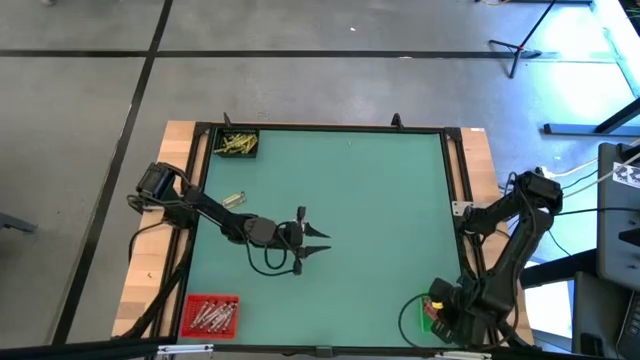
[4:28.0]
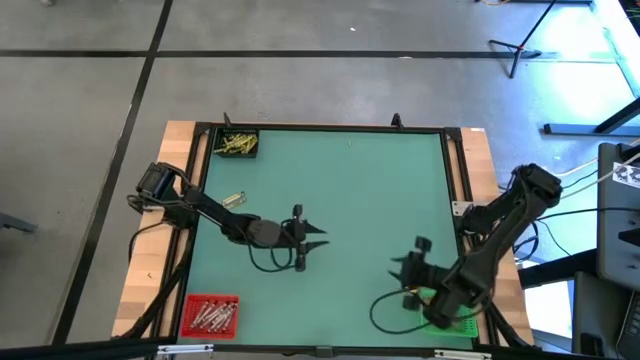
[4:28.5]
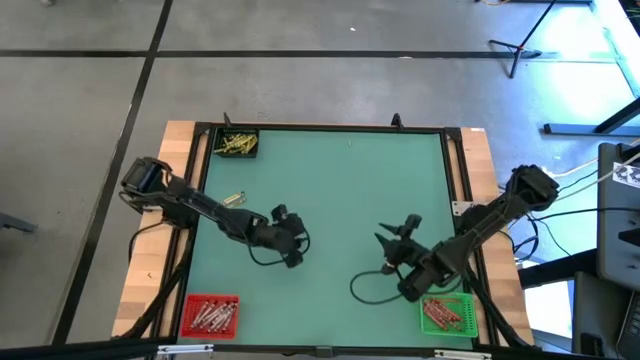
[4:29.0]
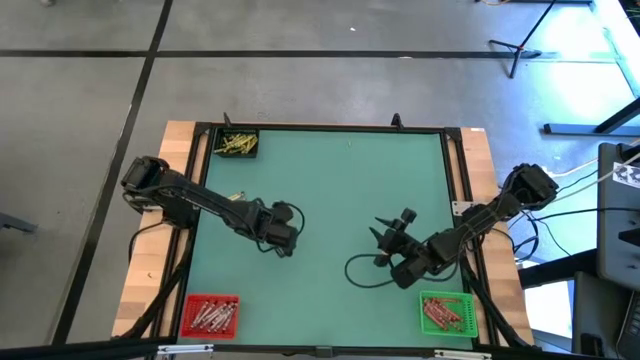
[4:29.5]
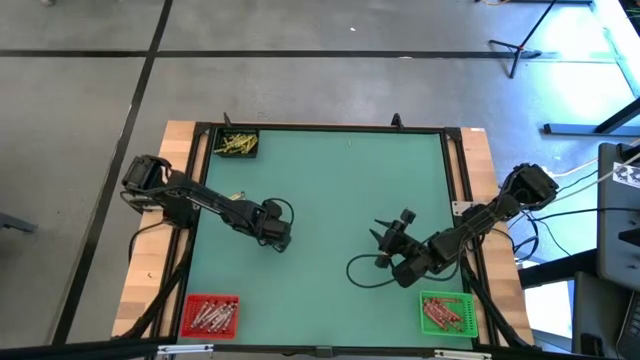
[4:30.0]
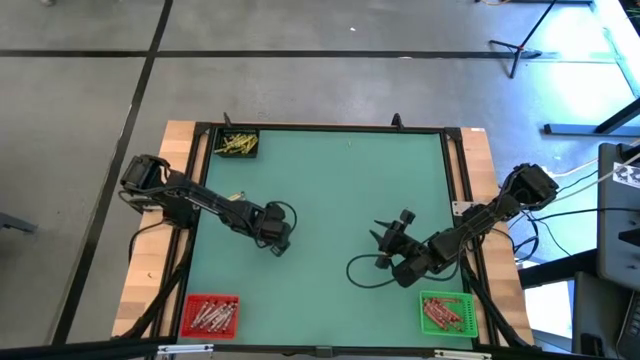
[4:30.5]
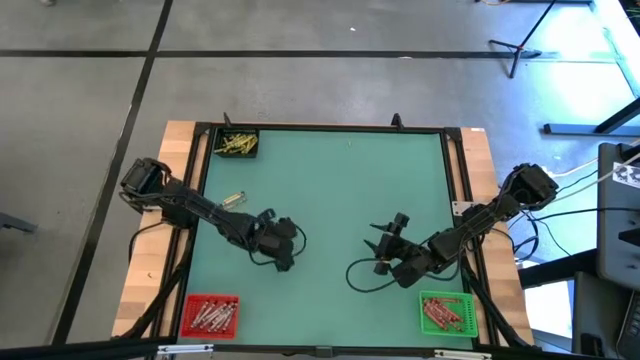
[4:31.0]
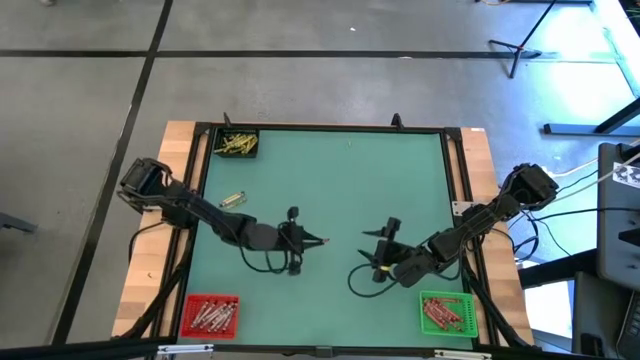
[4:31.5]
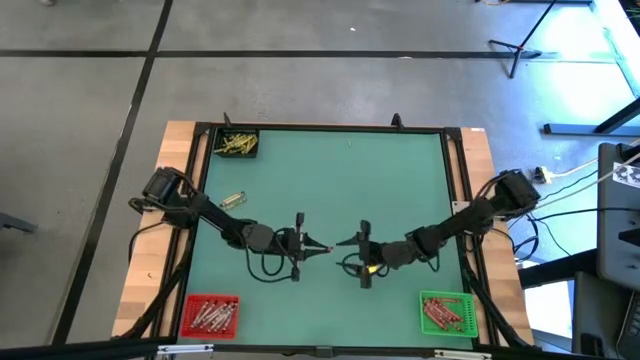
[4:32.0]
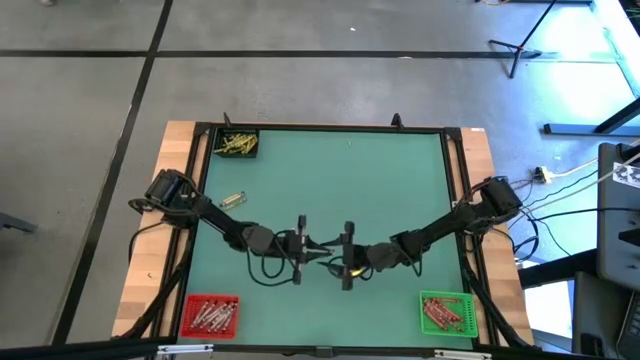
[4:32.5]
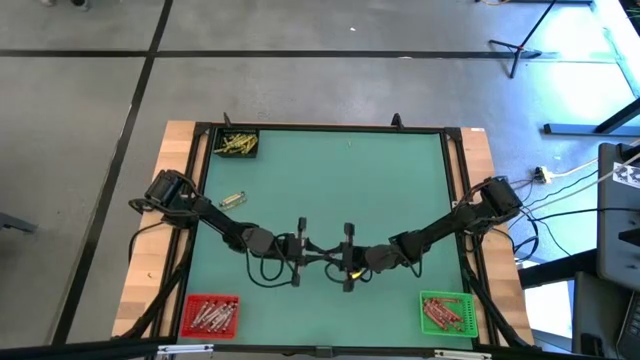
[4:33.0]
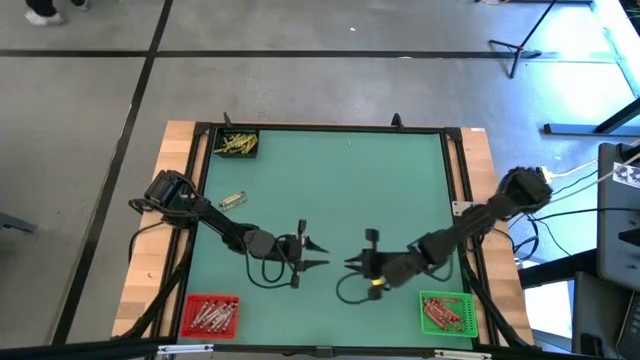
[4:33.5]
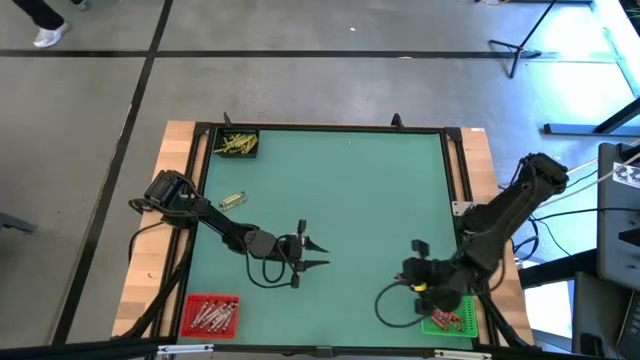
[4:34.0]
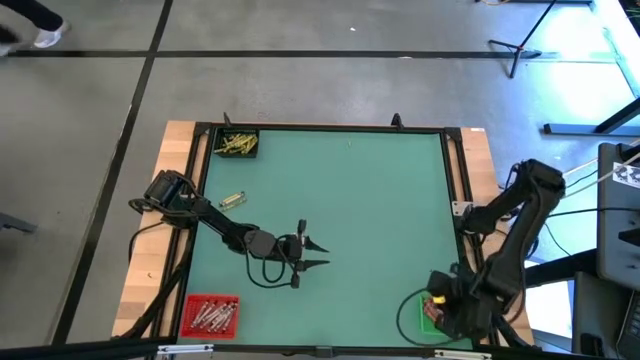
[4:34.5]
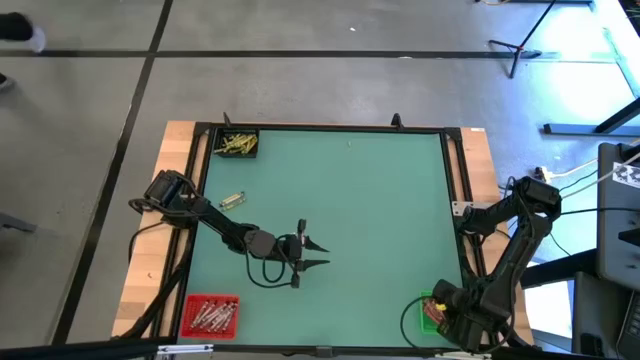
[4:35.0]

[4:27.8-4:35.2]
Task: Sort crayons
Put the red crayon into the green bin

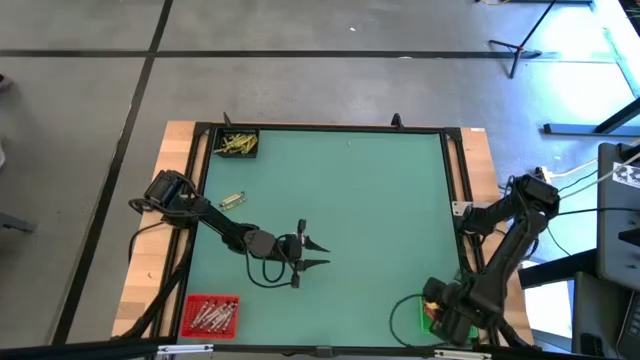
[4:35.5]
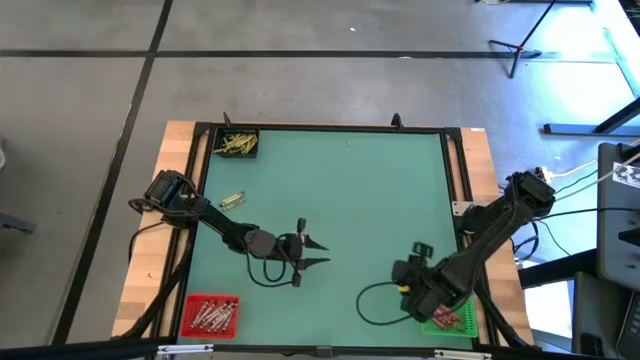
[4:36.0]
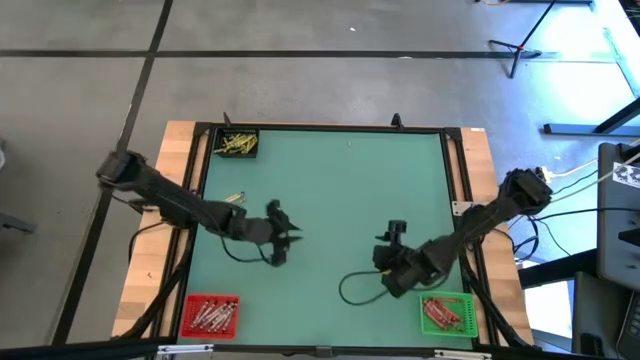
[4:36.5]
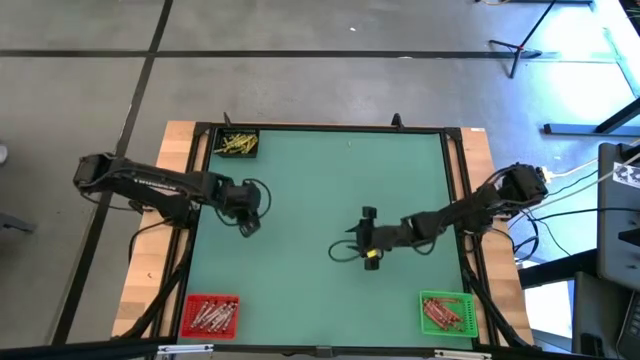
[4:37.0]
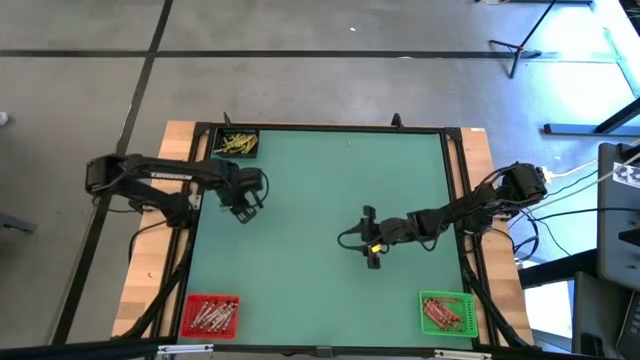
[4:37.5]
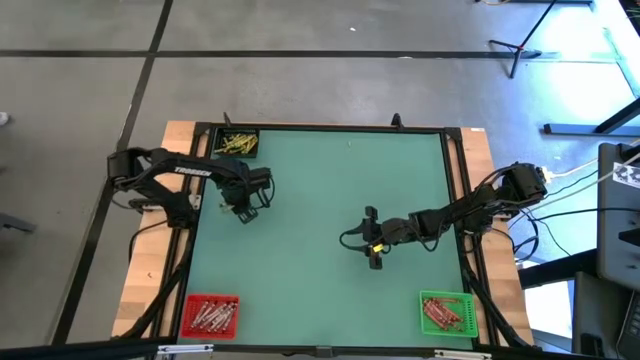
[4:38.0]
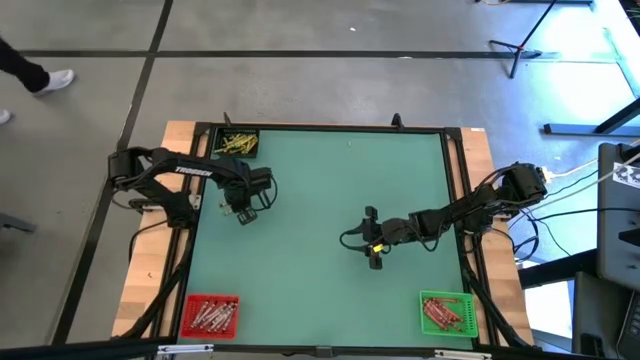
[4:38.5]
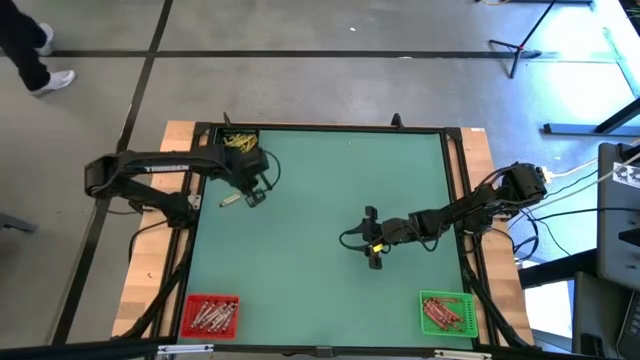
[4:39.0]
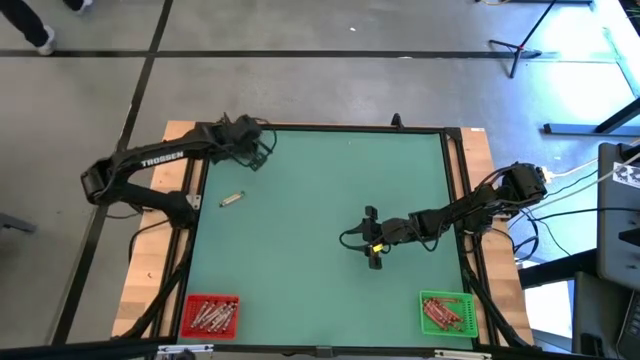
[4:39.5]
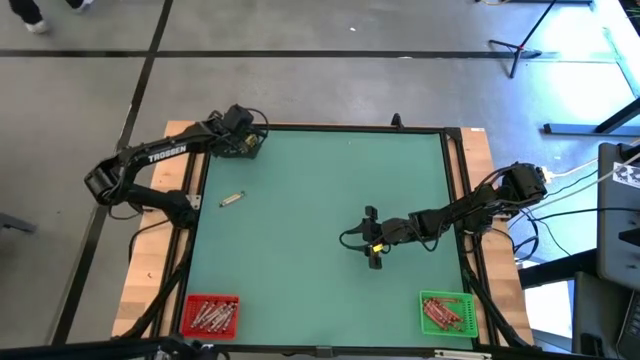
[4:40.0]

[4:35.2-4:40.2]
Put the bottom green crayon into the black bin

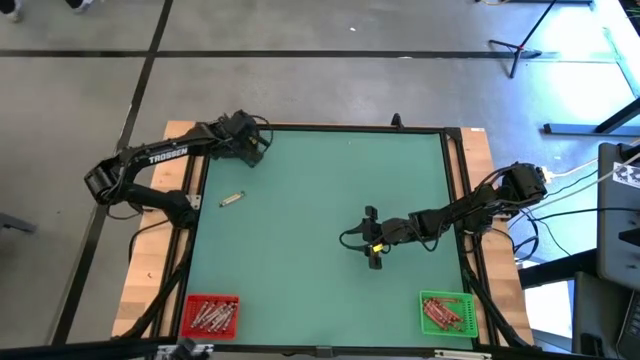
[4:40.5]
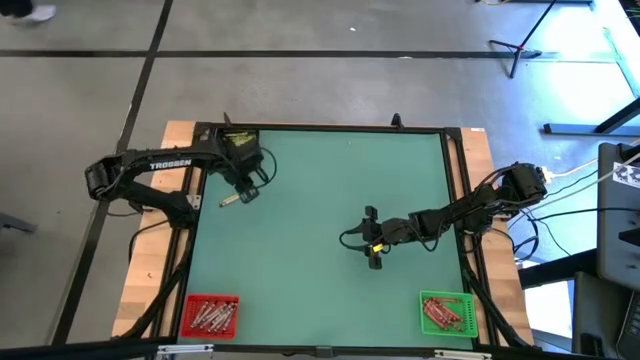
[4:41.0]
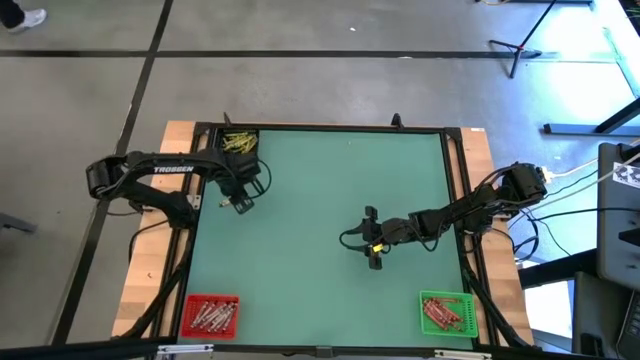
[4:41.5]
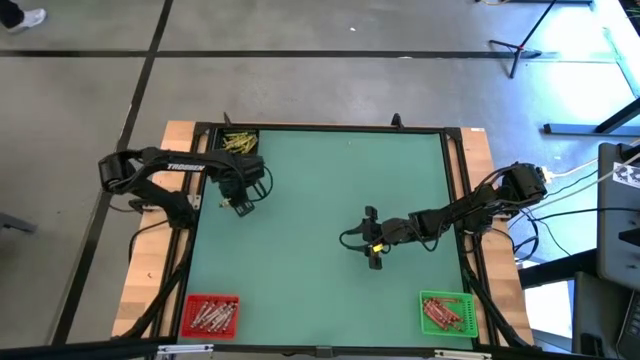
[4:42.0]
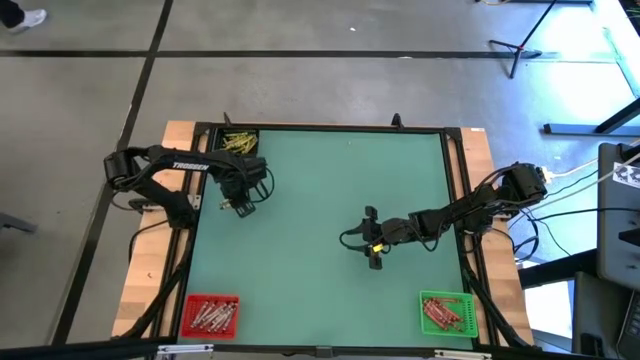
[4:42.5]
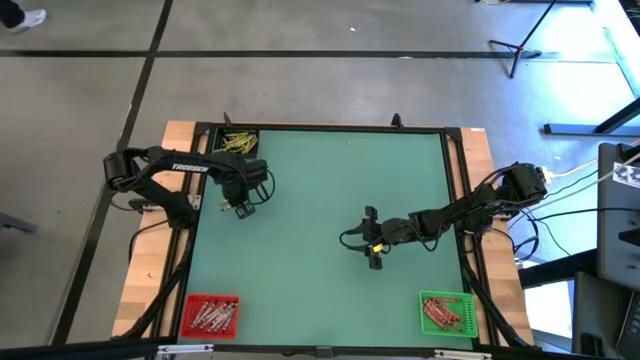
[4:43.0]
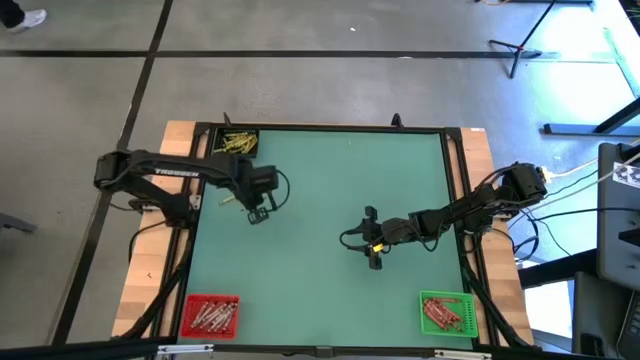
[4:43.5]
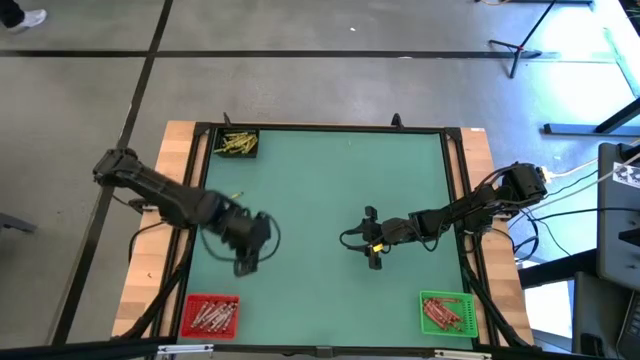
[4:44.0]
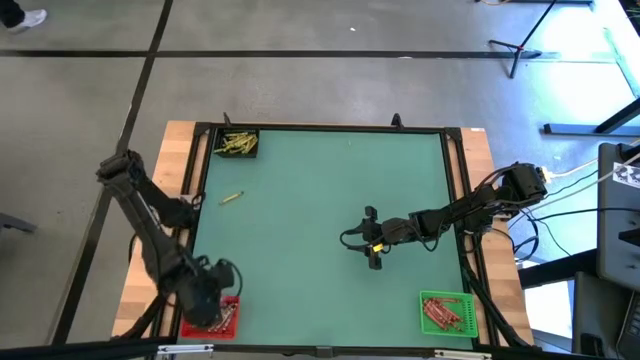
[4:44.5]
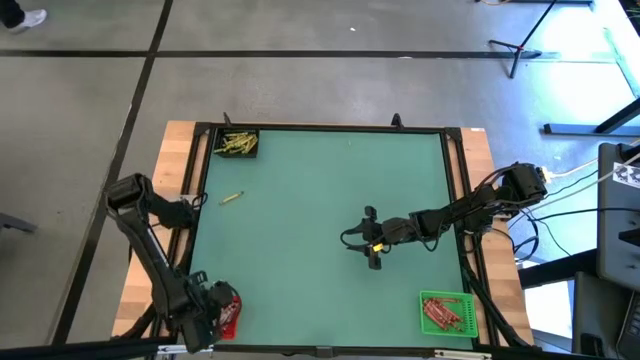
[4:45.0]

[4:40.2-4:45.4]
Put the black crayon into the red bin

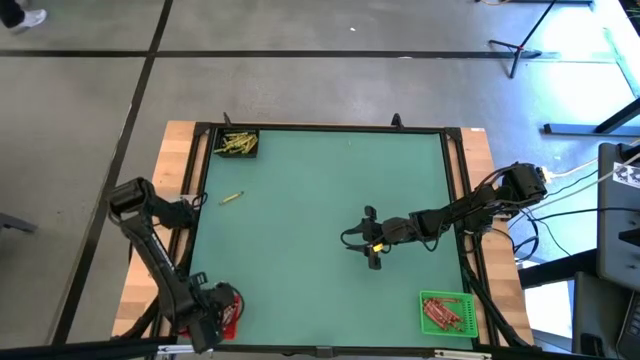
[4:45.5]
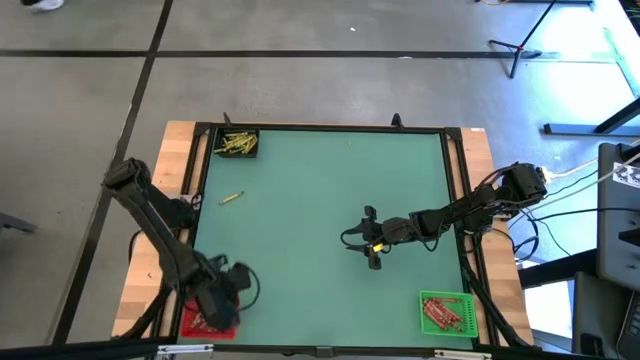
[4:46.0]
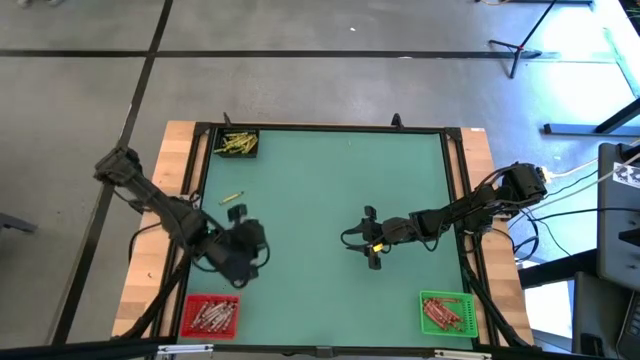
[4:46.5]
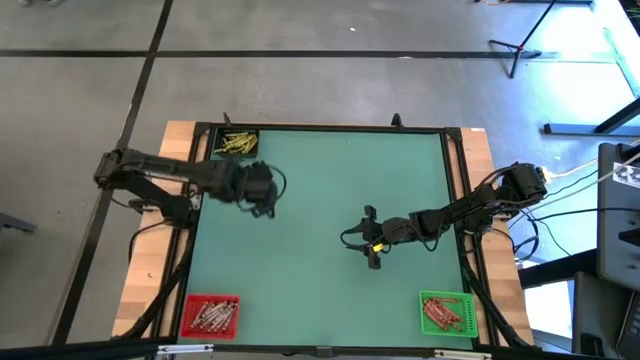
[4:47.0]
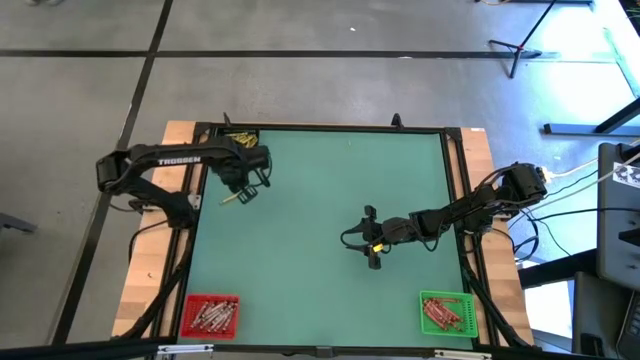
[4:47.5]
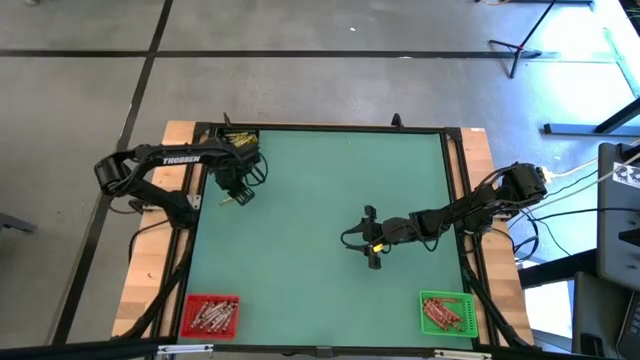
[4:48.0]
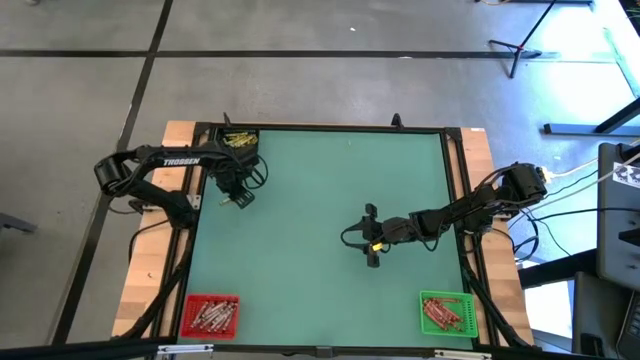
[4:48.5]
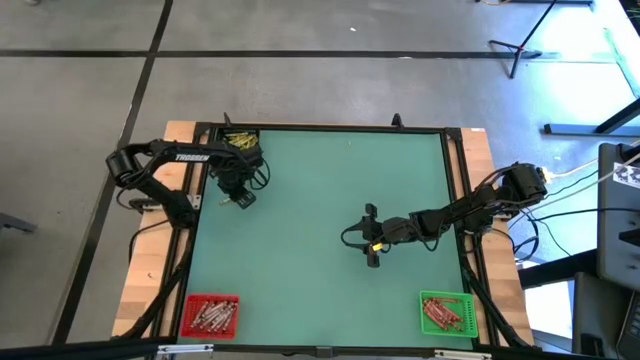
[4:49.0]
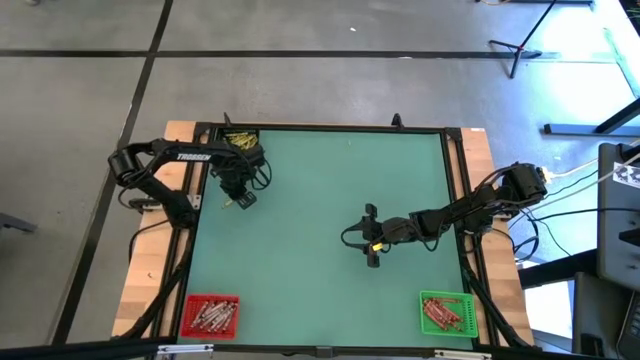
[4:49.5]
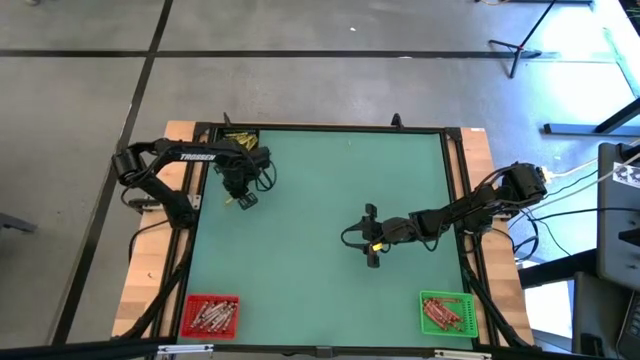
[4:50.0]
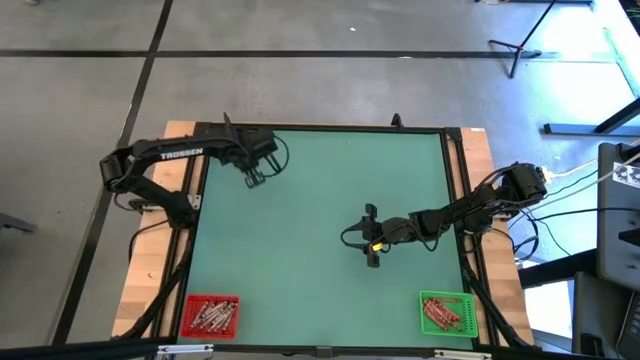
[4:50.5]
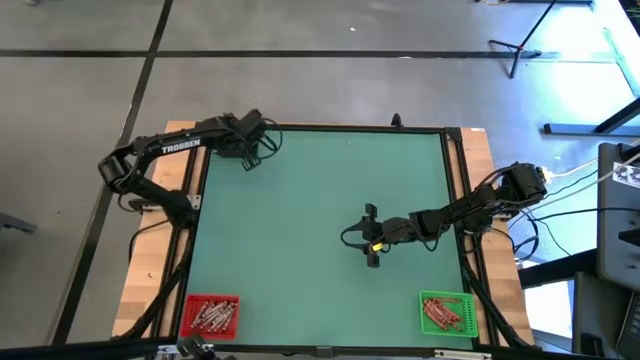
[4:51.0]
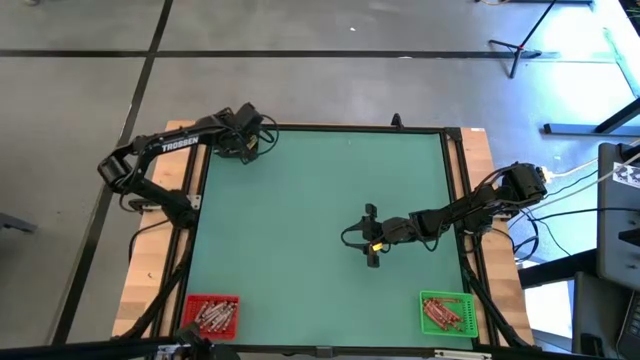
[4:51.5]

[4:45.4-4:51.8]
Put the green crayon into the black bin
